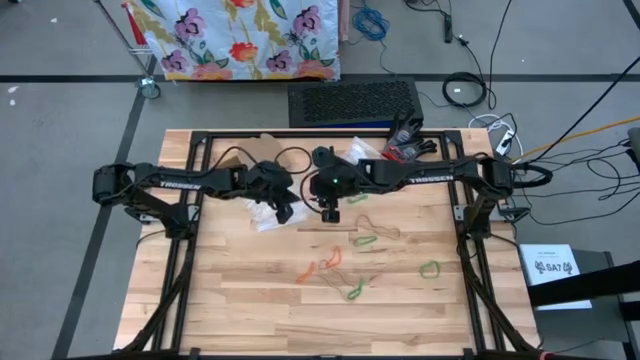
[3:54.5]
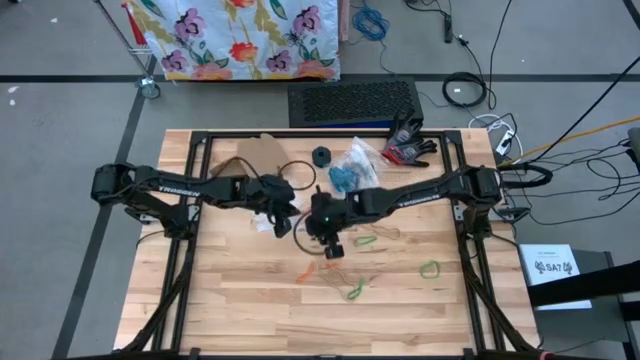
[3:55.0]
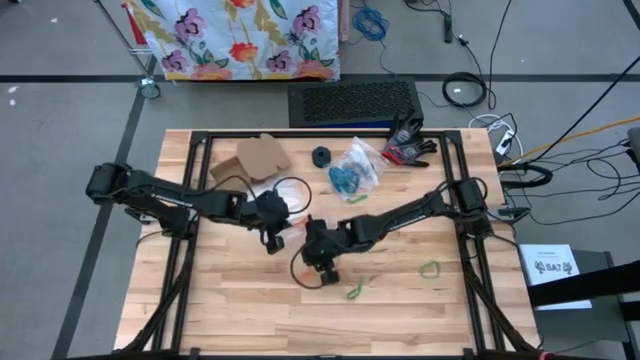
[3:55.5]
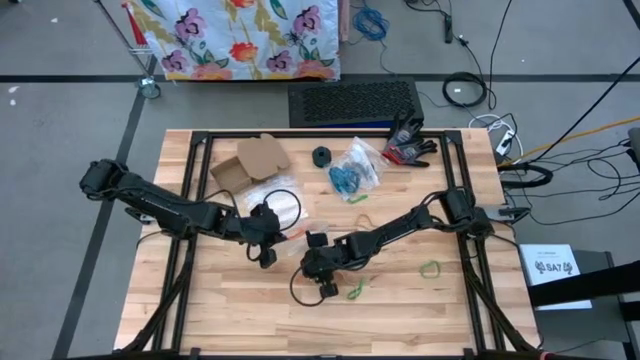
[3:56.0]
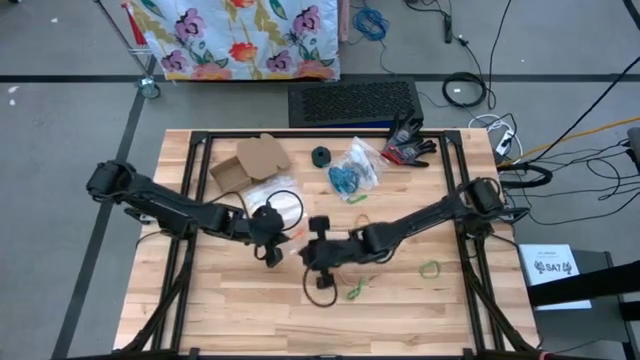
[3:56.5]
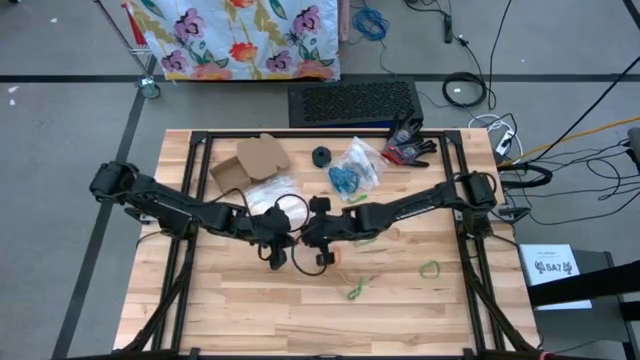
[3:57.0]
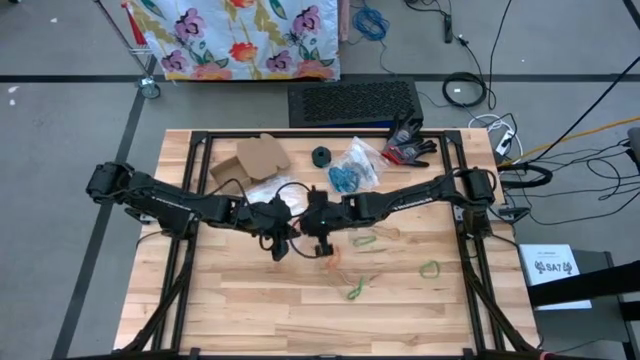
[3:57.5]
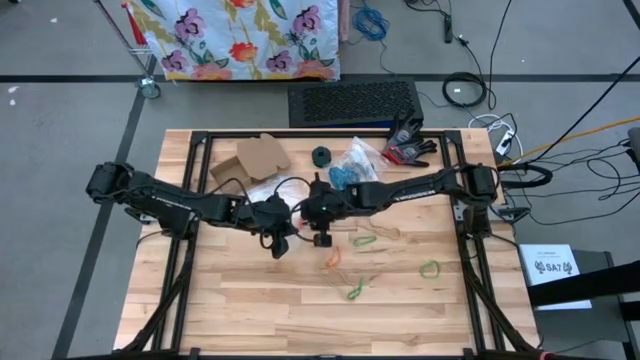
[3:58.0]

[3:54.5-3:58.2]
Task: Sort rubber bands
Put the orange rubber band into the transparent zip bag

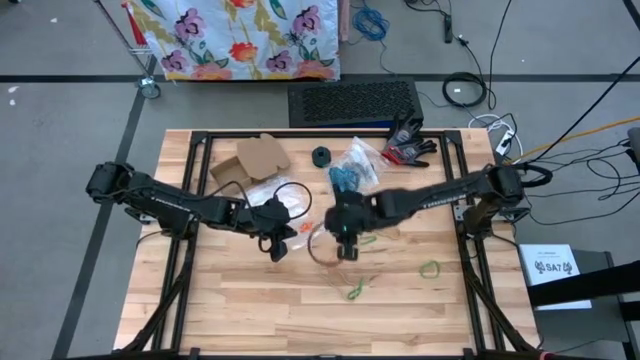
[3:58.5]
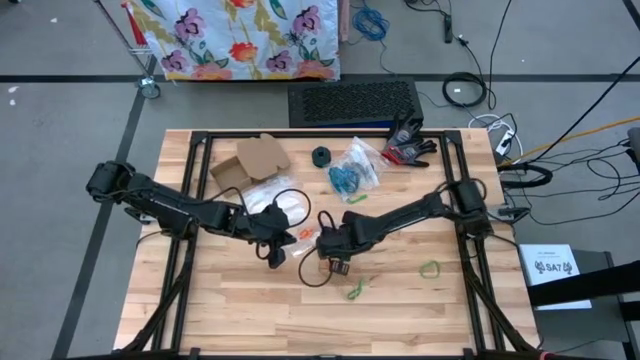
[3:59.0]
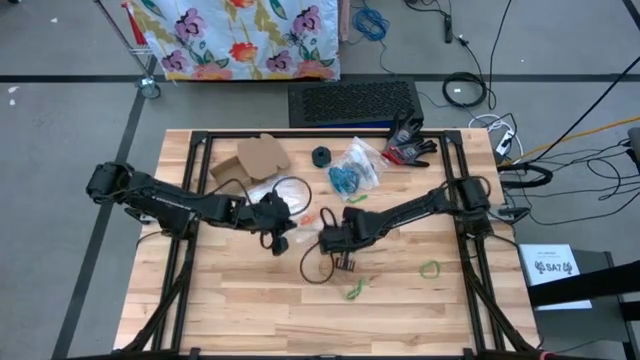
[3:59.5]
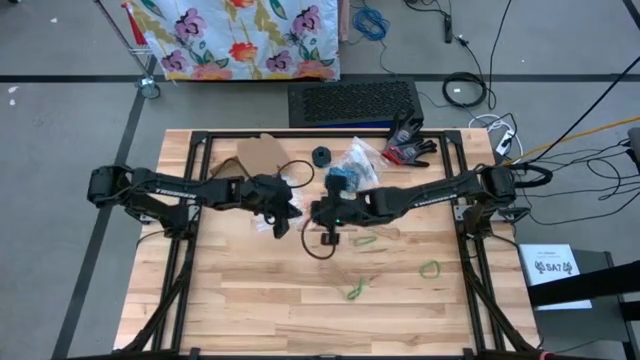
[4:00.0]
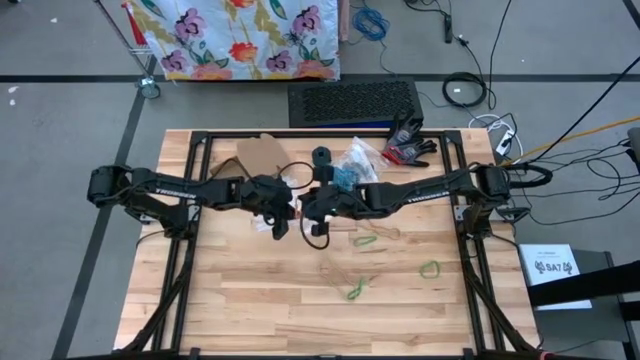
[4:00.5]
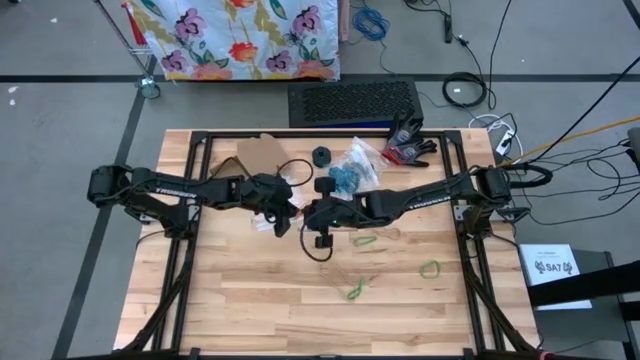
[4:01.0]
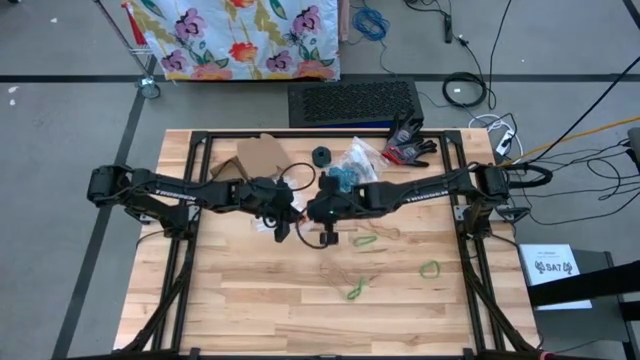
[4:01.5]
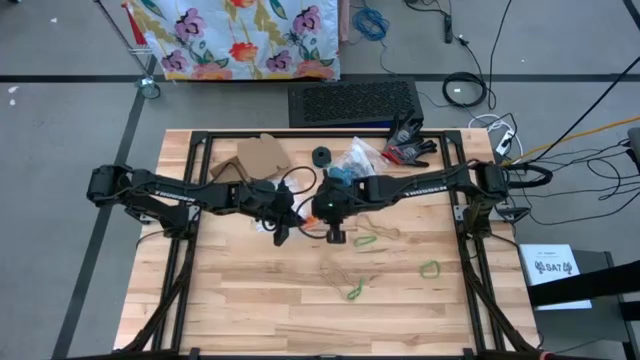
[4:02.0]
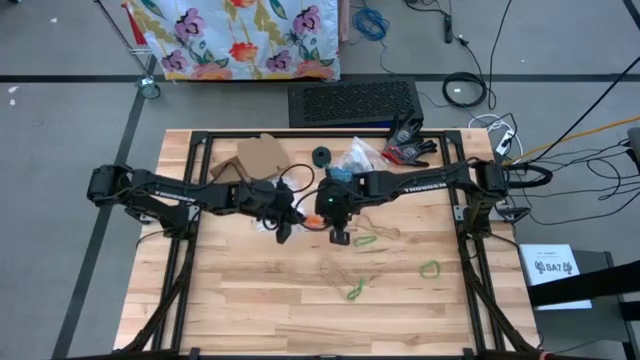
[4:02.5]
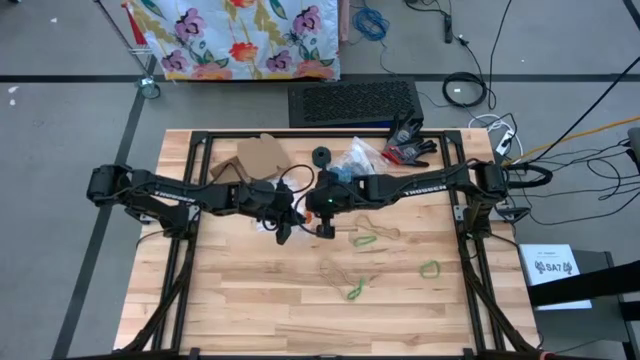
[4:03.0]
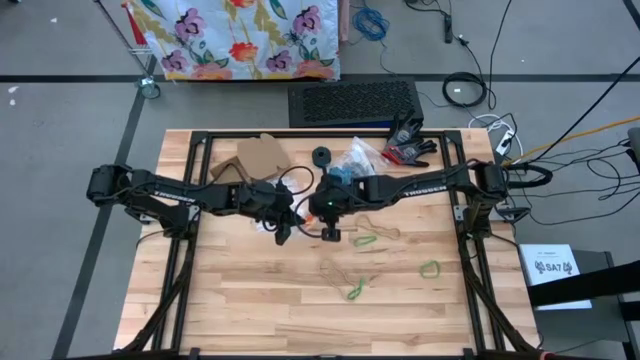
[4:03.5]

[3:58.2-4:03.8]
Put the orange rubber band into the transparent zip bag

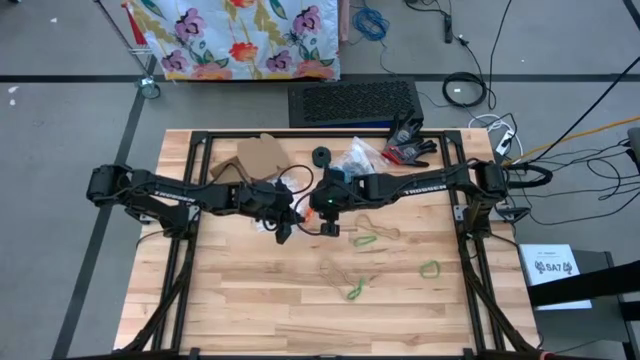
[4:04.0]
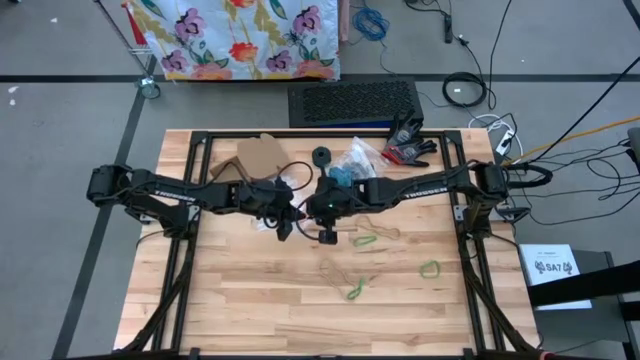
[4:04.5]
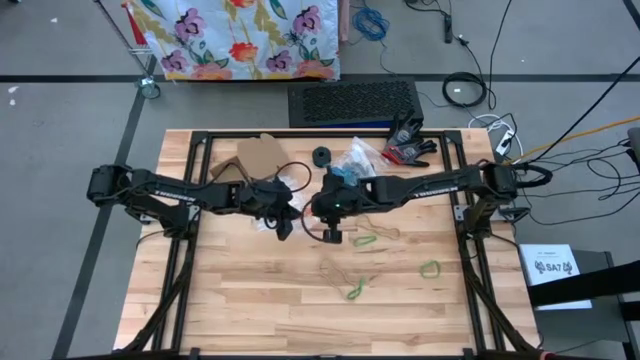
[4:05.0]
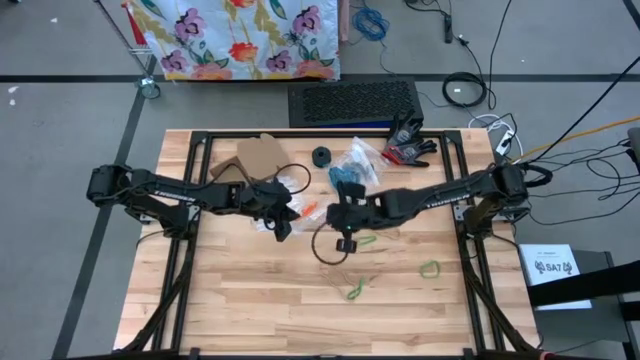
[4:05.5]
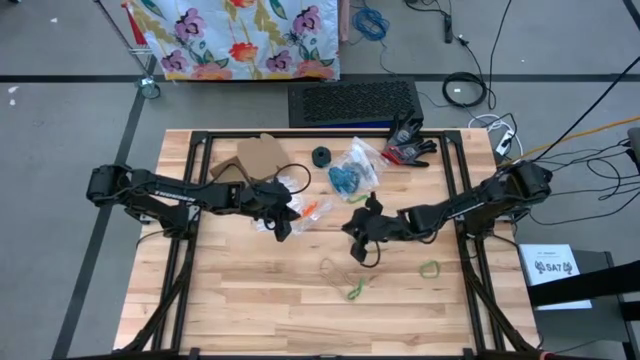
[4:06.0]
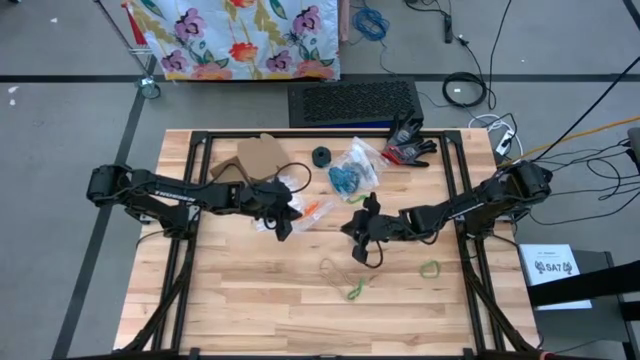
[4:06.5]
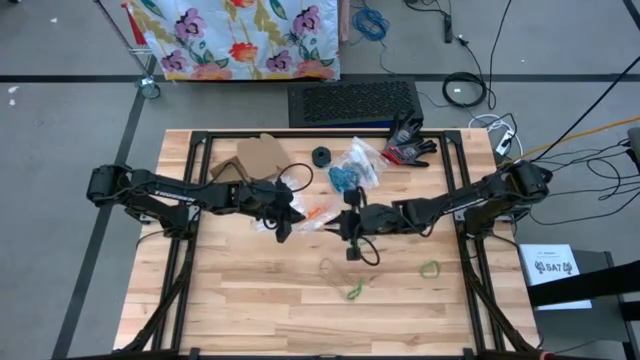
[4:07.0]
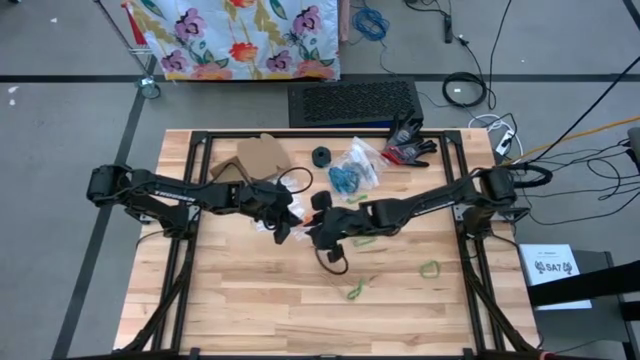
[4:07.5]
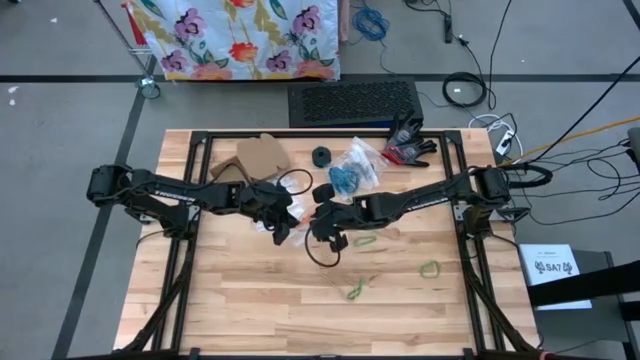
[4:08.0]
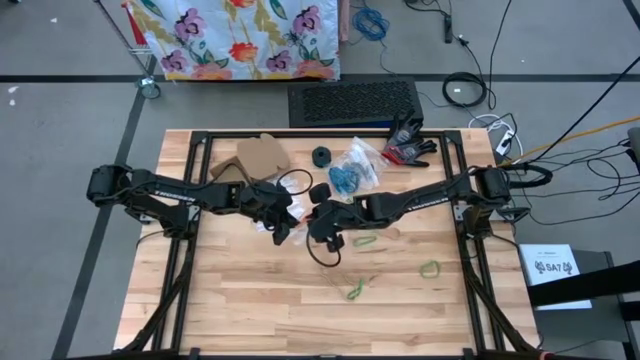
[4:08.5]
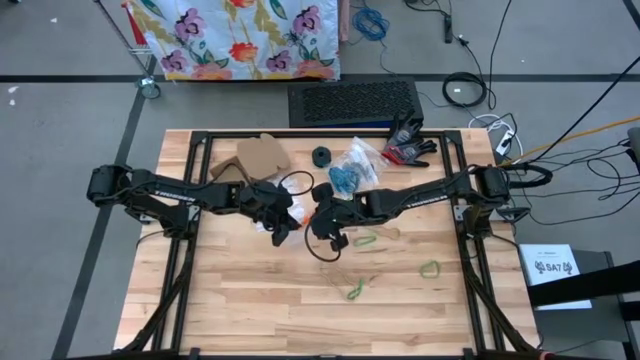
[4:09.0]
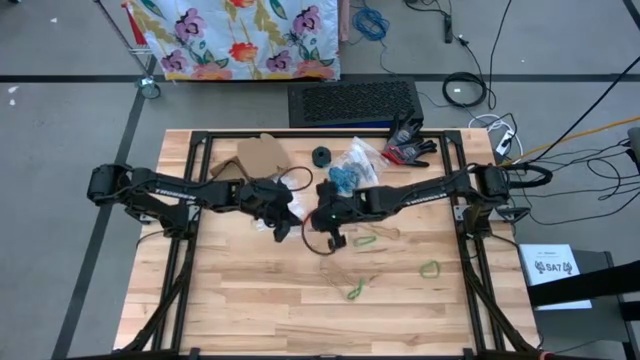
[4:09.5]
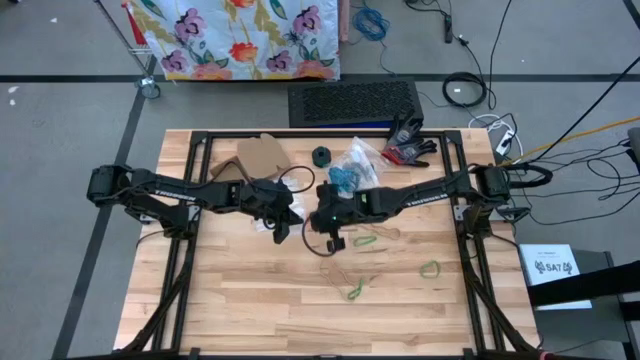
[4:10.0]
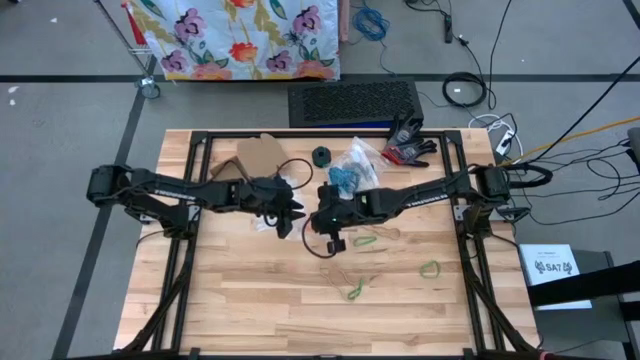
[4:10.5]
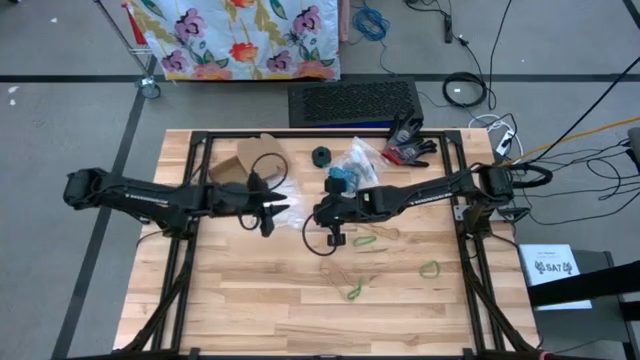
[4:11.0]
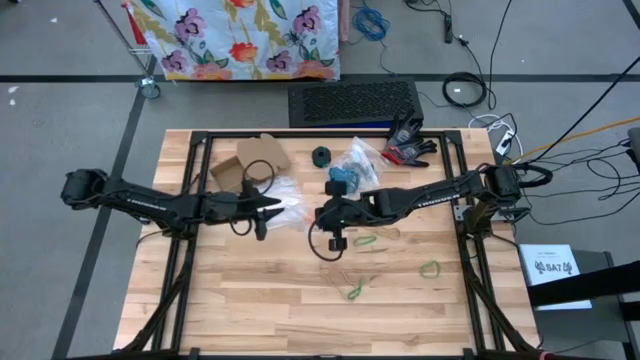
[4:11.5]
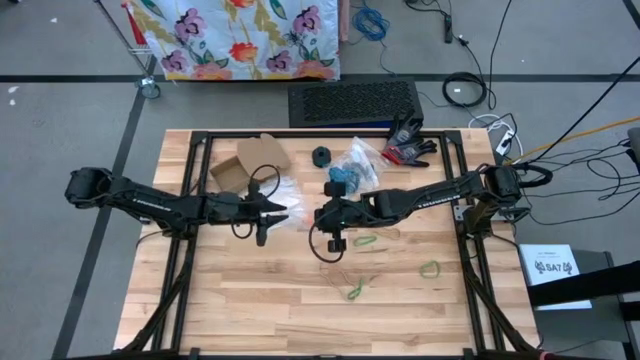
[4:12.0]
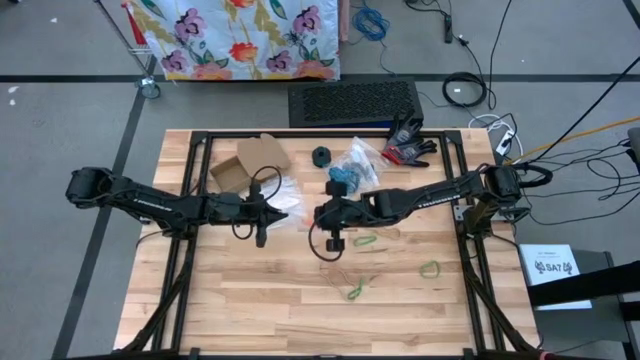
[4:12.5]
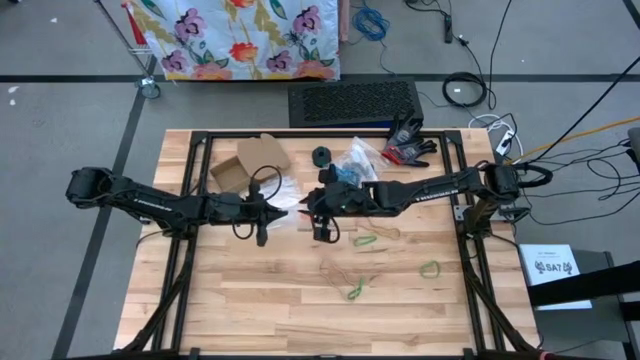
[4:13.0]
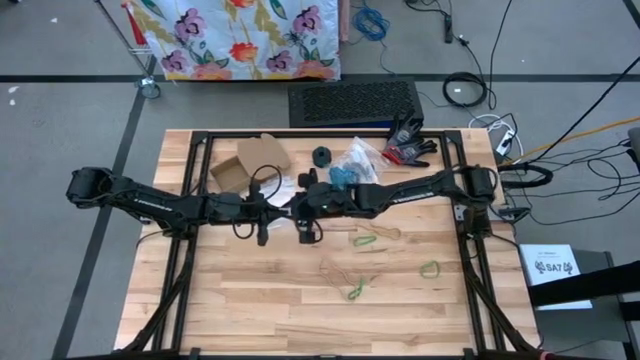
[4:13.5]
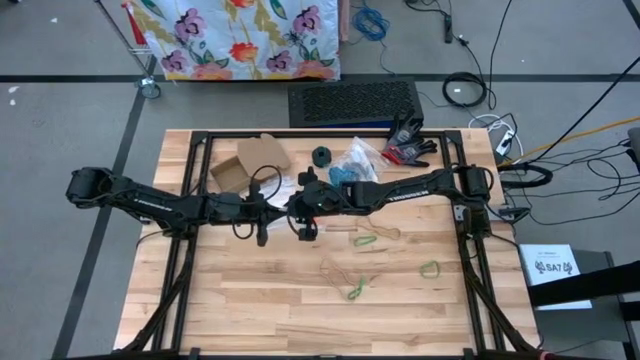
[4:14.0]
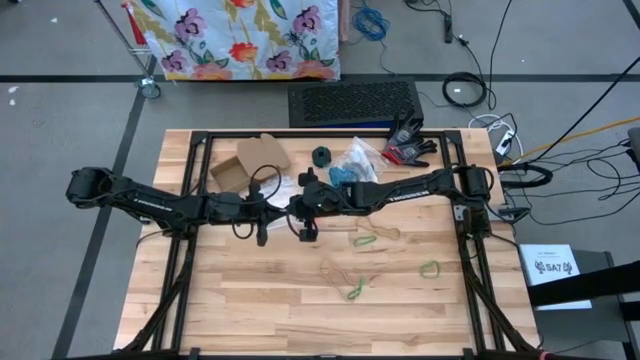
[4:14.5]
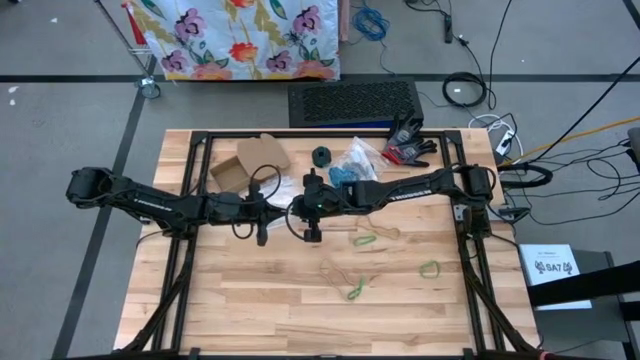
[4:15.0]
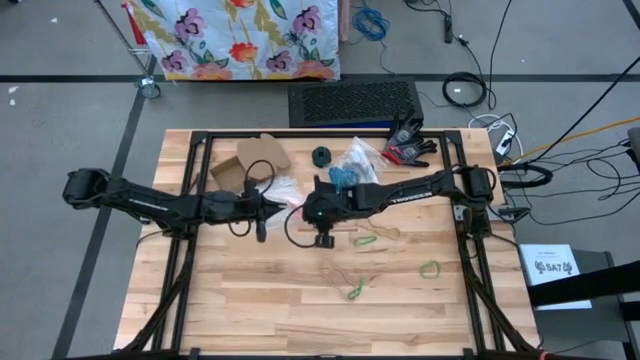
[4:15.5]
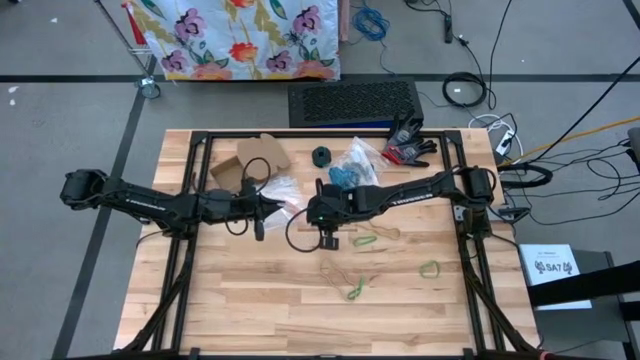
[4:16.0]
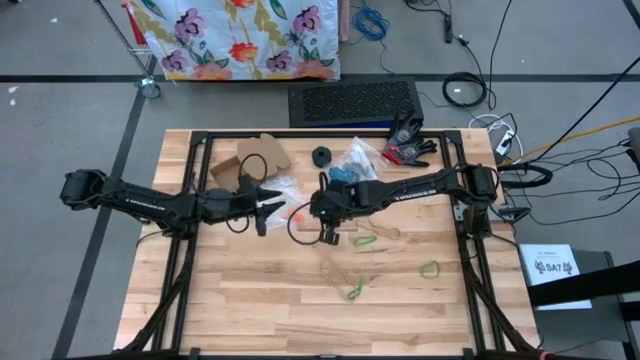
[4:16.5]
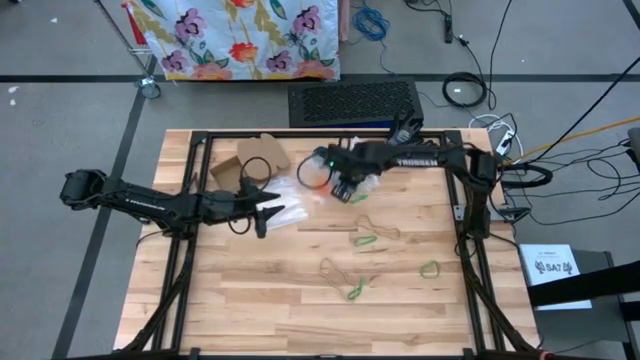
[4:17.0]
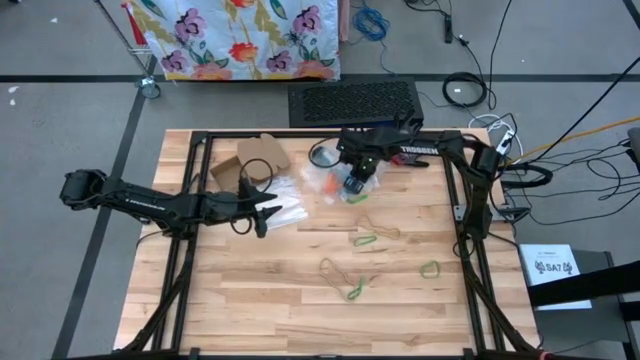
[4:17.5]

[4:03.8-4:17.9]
Close the transparent zip bag
